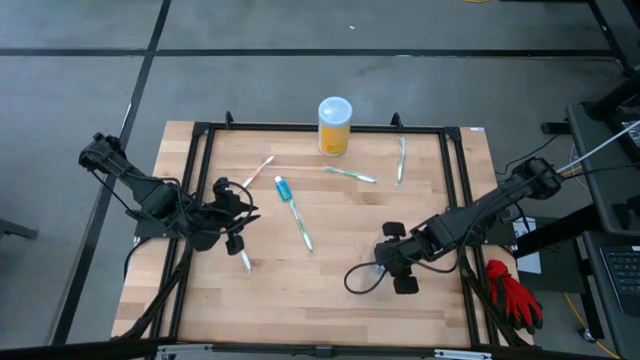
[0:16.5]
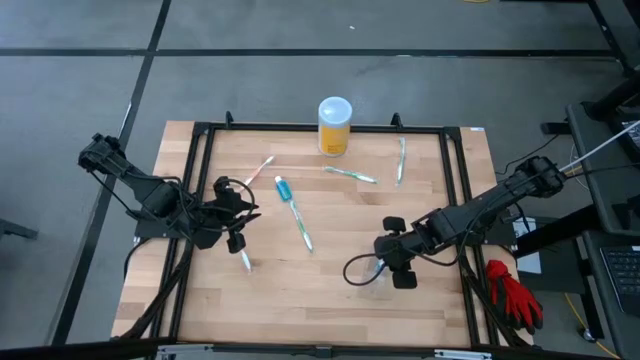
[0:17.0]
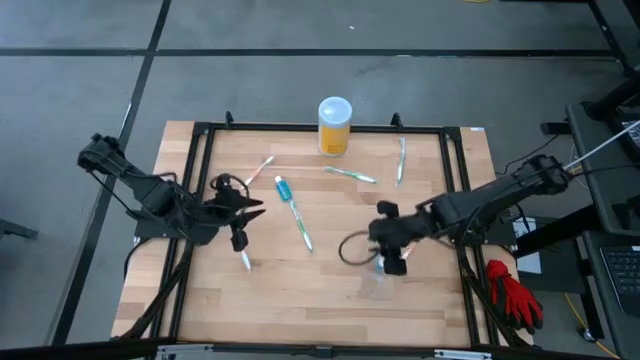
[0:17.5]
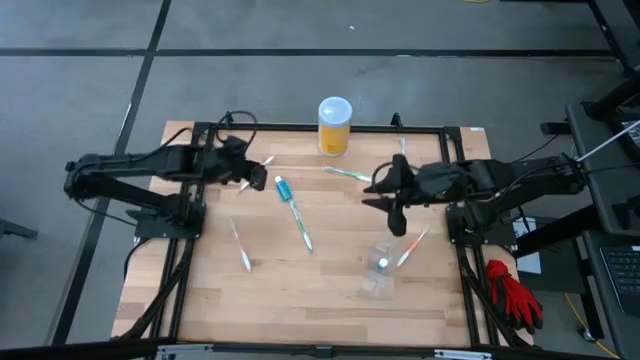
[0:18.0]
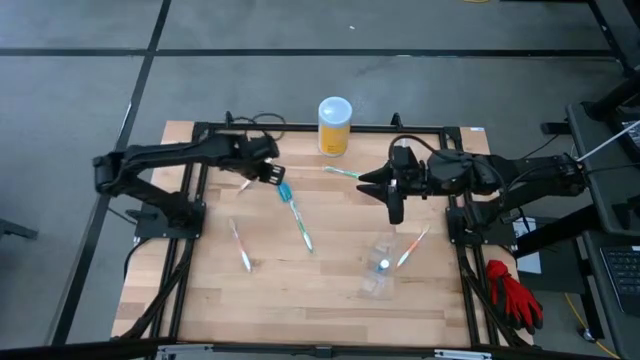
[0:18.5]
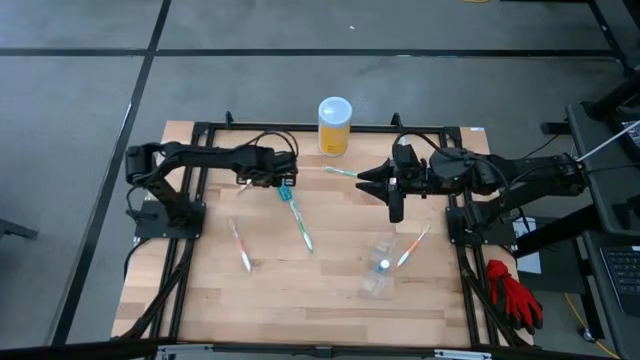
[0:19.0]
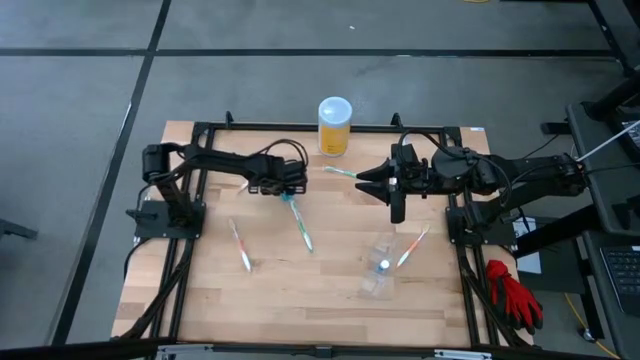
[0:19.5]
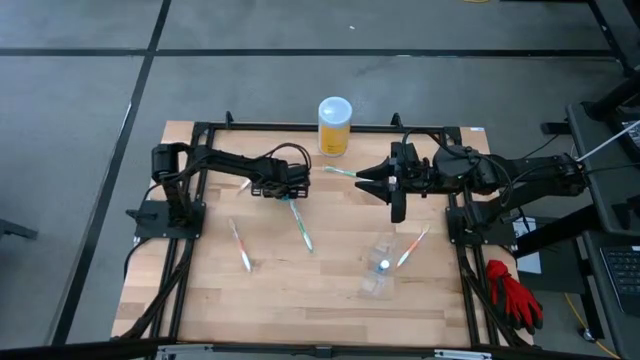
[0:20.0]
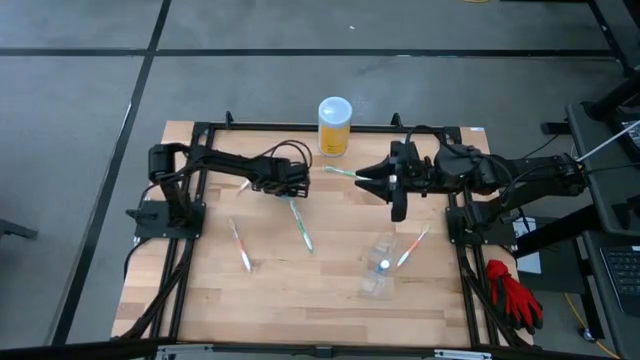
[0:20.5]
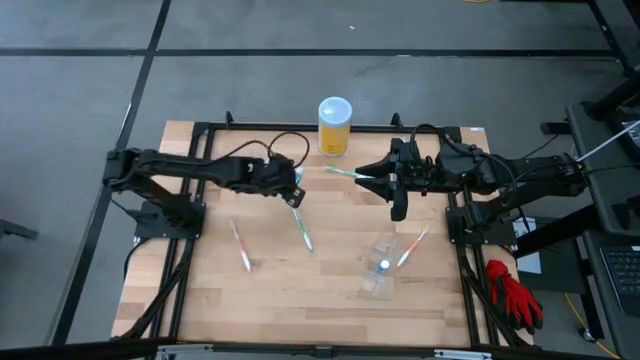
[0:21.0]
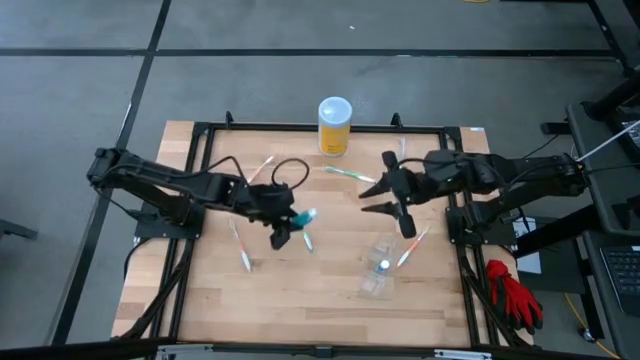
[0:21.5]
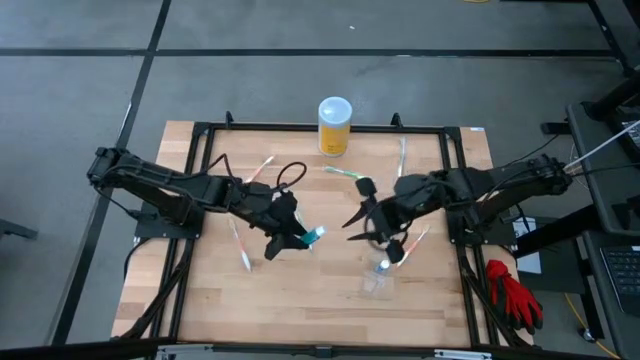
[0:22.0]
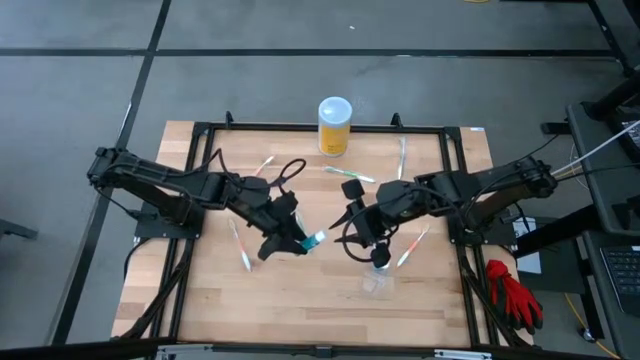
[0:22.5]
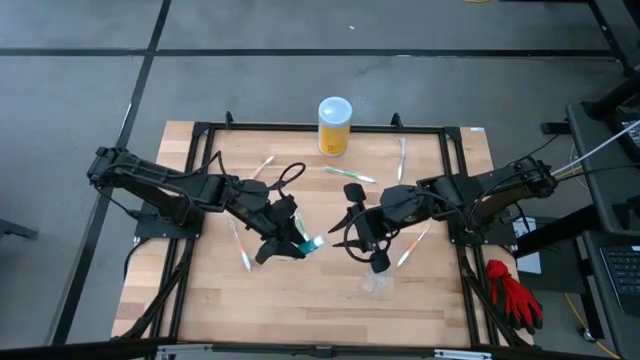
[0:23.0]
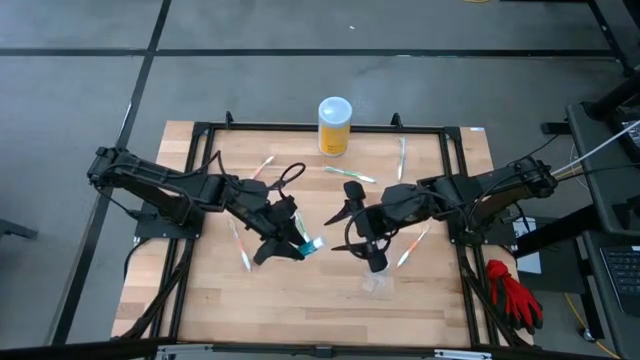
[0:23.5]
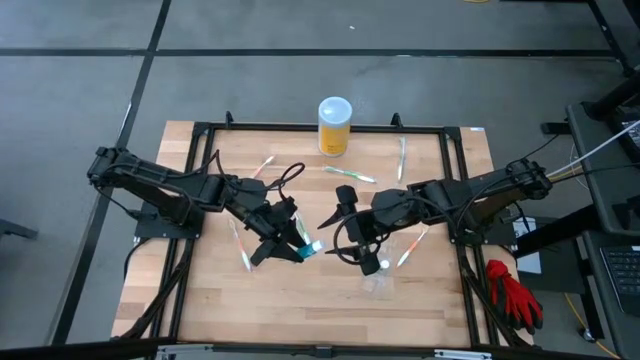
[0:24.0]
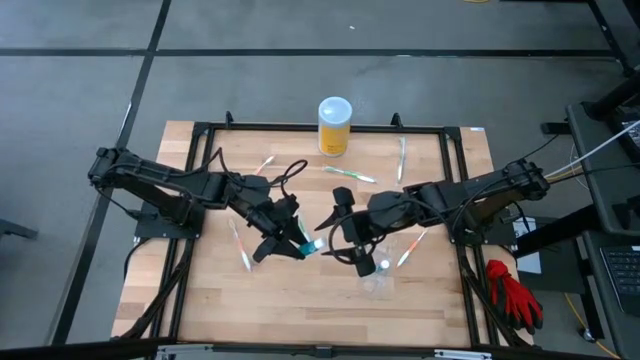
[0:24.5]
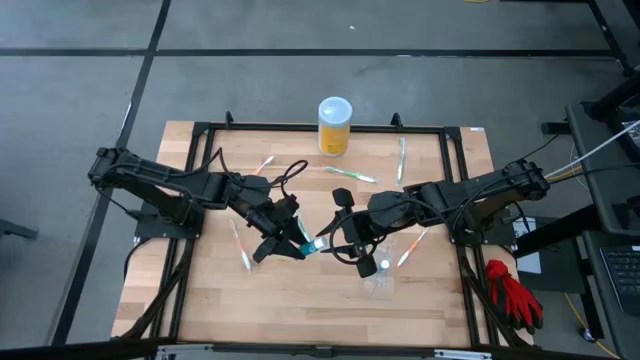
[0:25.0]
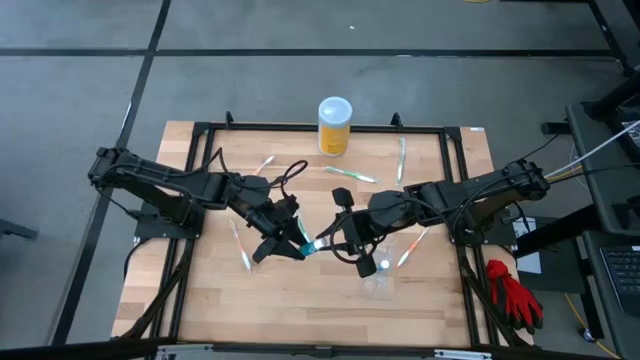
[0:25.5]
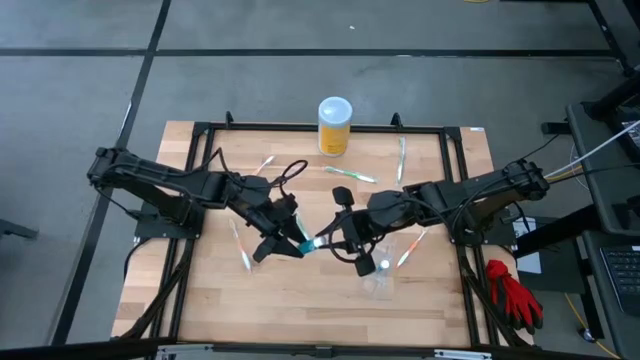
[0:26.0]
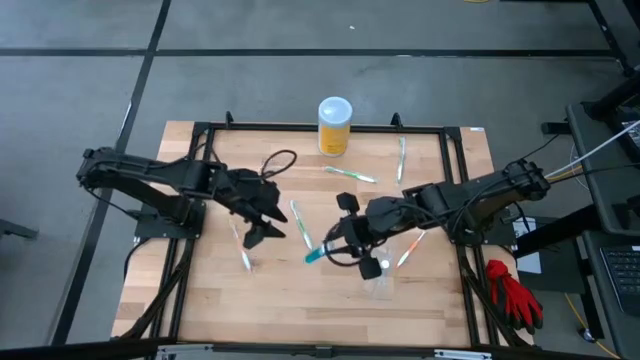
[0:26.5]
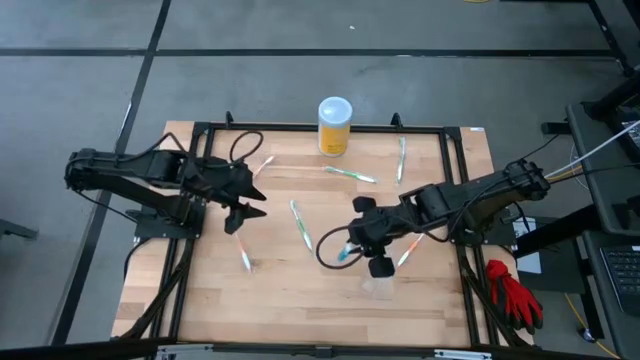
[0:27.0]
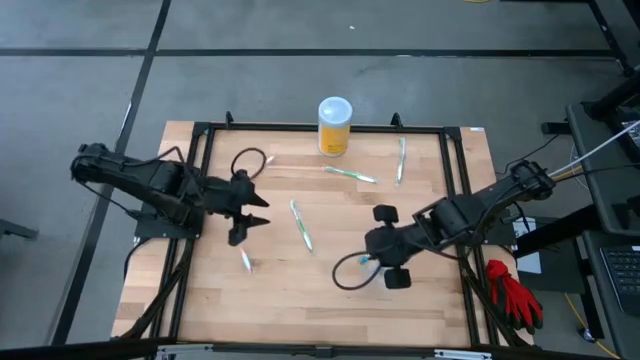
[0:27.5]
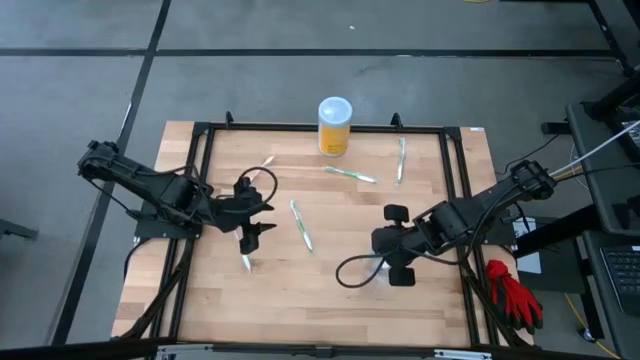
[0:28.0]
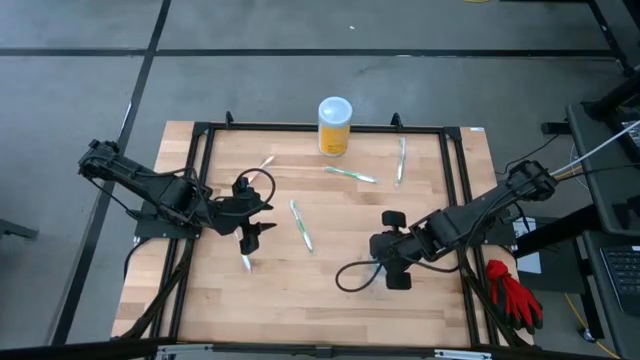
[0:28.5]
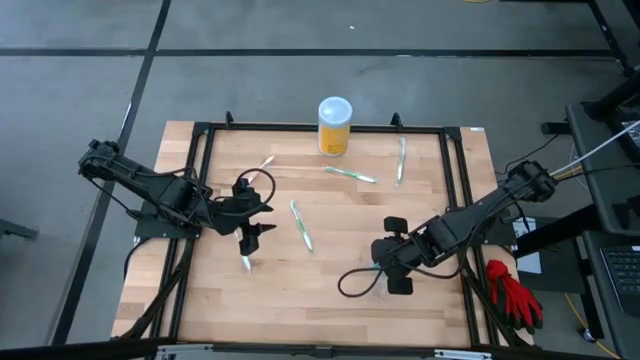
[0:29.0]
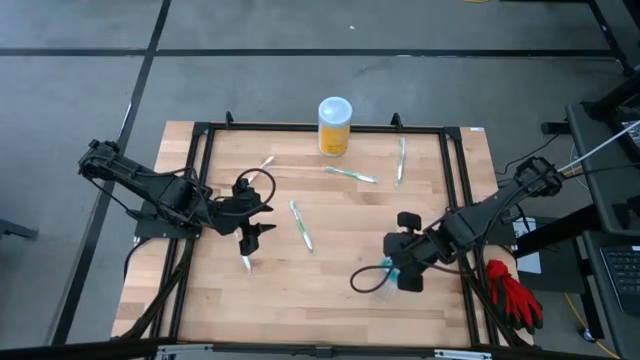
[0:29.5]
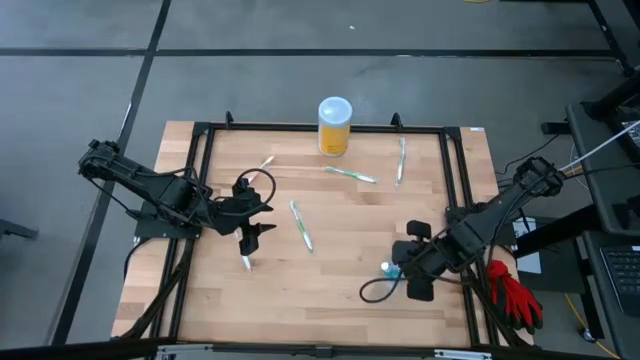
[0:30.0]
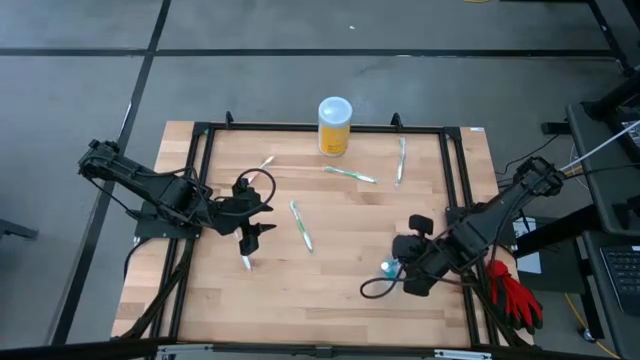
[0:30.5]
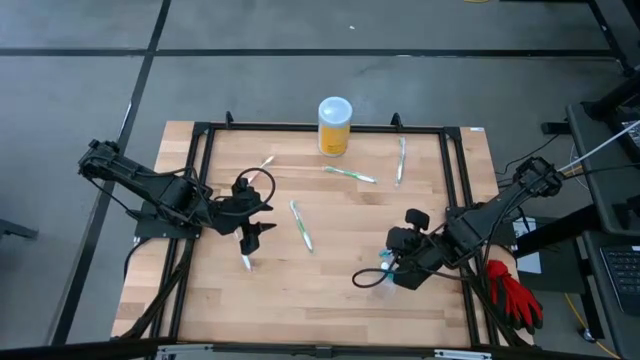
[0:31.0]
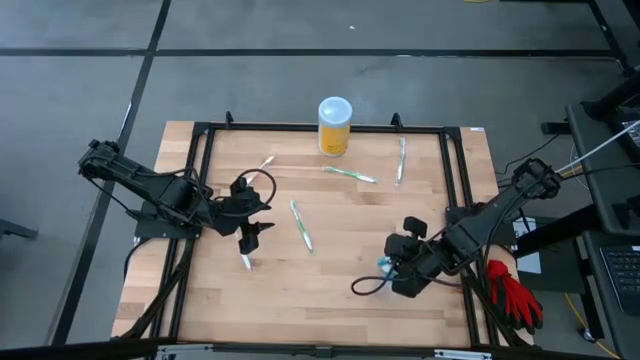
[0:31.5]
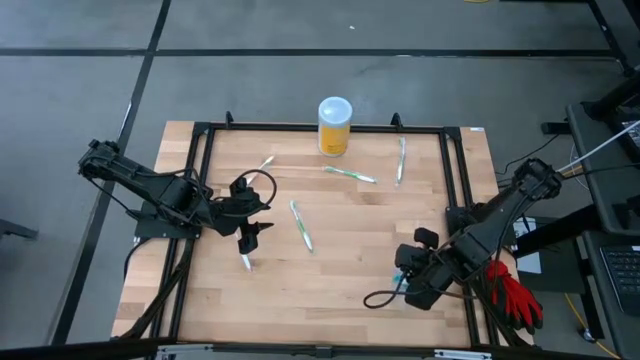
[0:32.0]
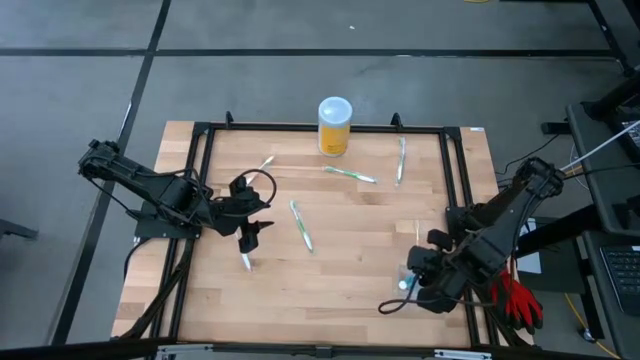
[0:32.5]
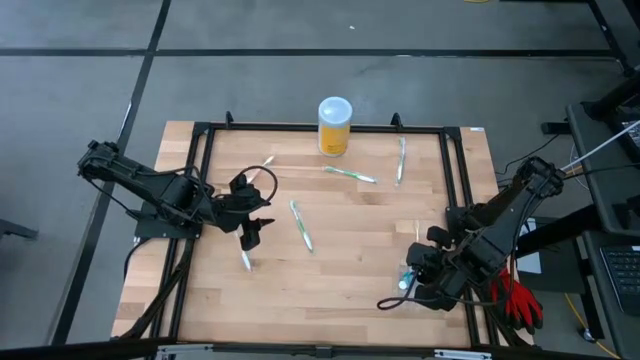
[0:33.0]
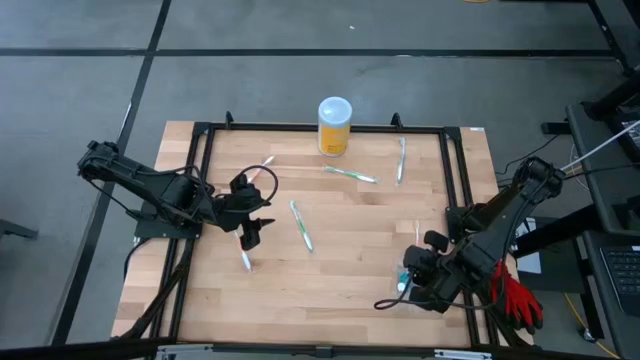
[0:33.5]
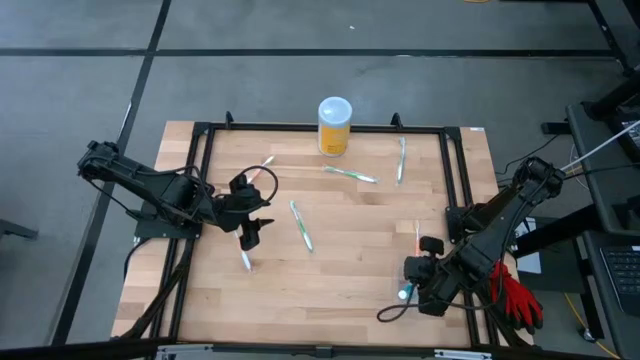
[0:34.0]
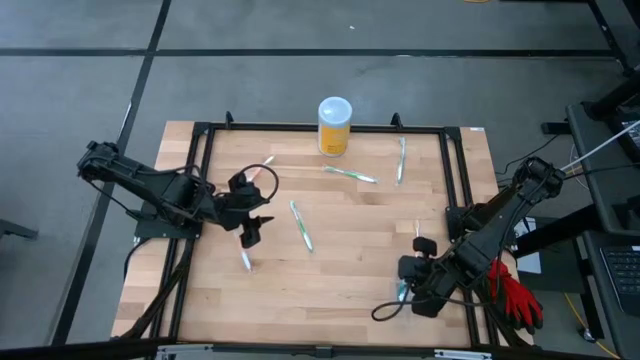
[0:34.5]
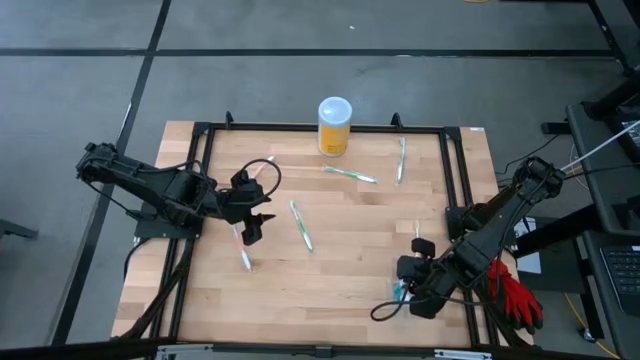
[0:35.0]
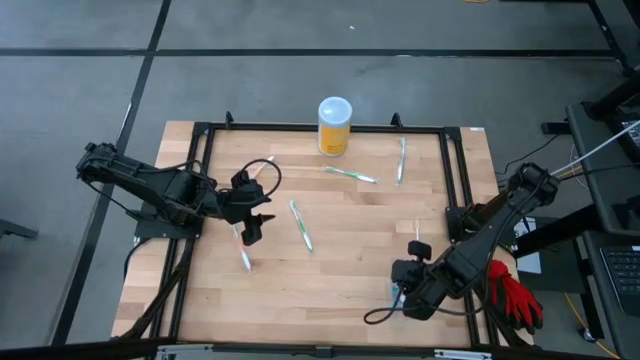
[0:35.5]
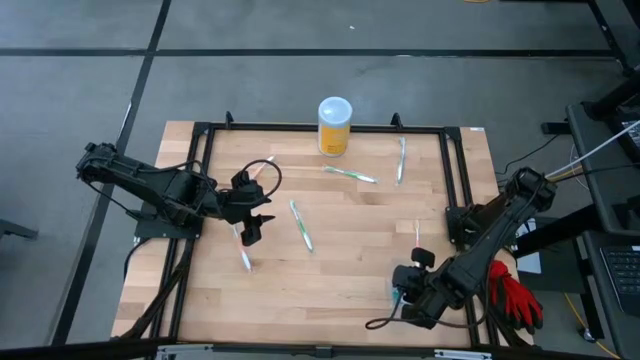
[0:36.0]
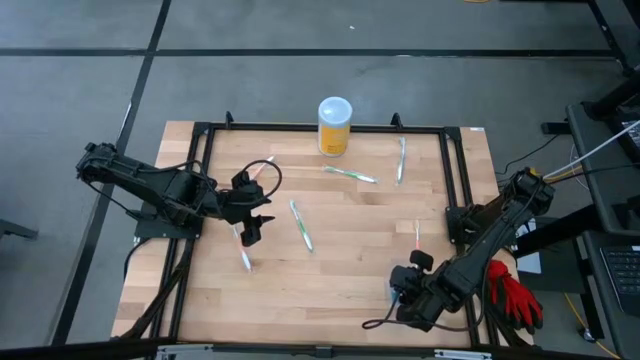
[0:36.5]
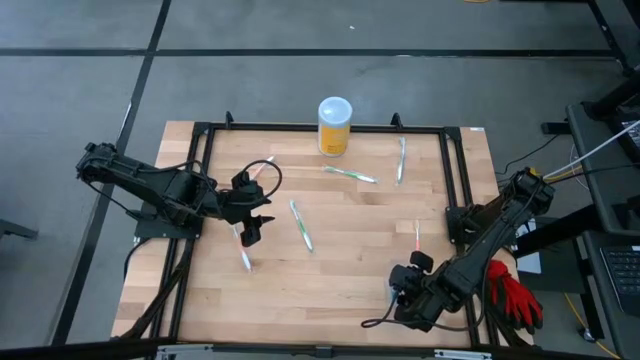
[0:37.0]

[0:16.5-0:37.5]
Task: Pick & Place toothbrushing station
Put the blue mouthwash bottle into the transparent organizer
